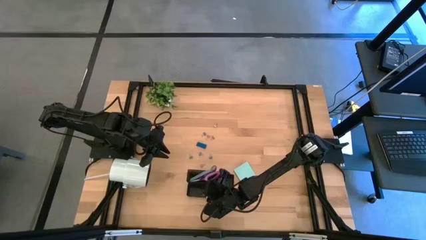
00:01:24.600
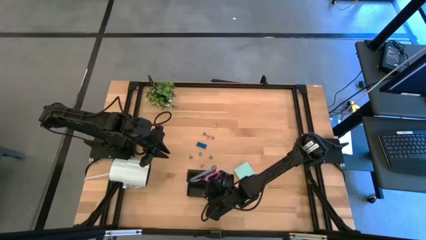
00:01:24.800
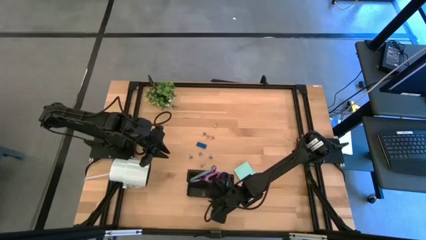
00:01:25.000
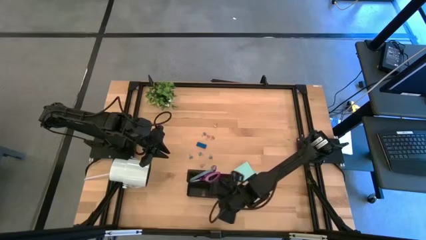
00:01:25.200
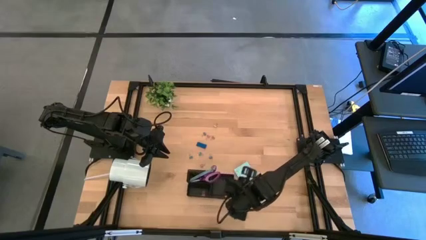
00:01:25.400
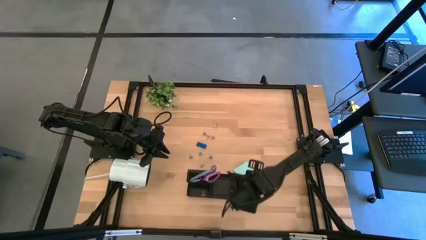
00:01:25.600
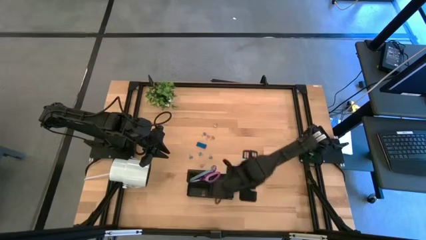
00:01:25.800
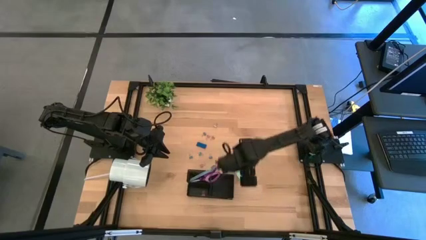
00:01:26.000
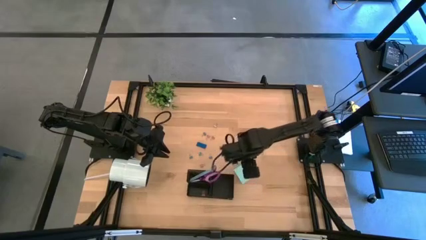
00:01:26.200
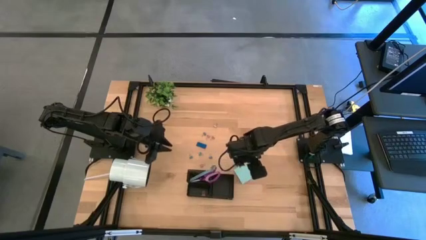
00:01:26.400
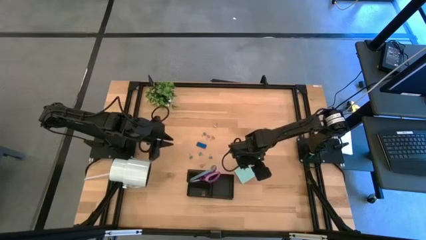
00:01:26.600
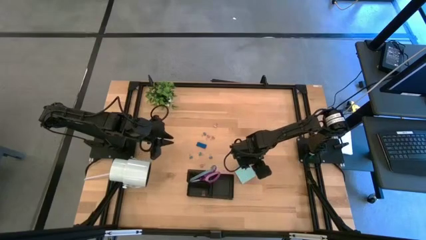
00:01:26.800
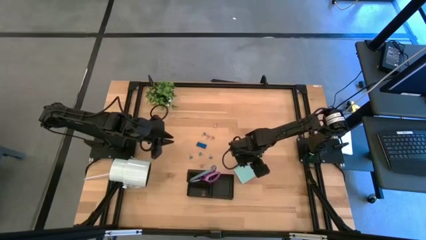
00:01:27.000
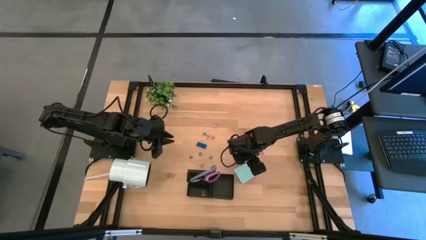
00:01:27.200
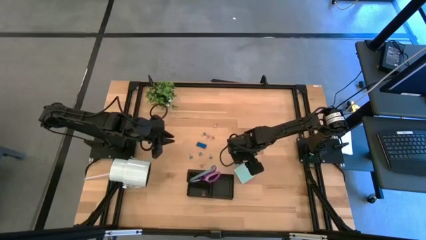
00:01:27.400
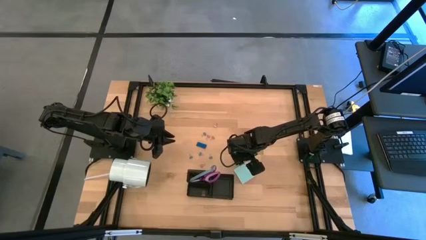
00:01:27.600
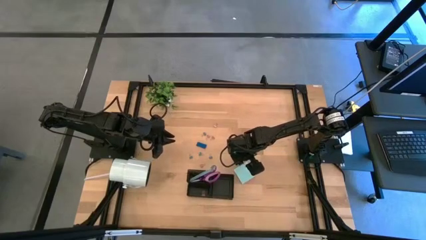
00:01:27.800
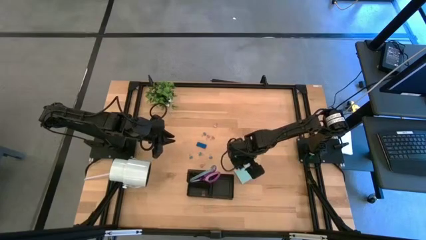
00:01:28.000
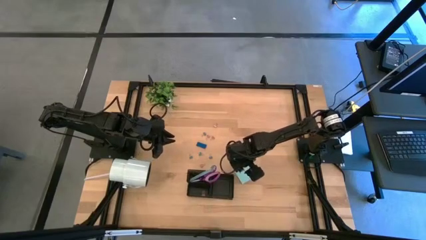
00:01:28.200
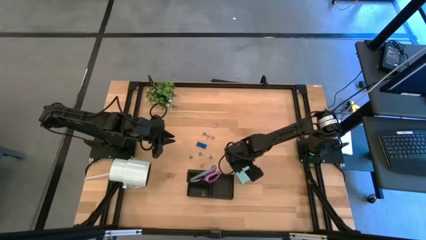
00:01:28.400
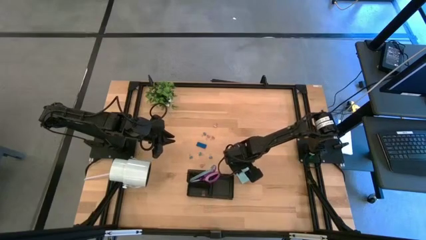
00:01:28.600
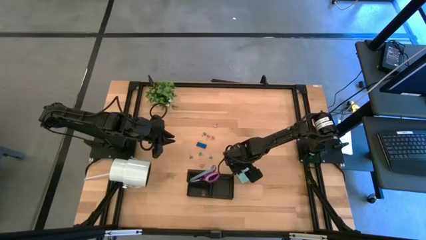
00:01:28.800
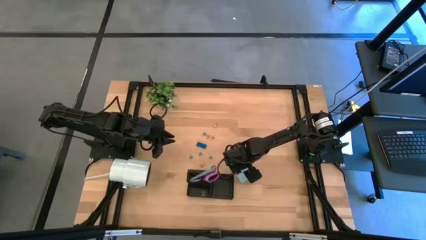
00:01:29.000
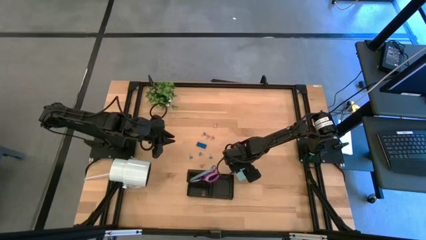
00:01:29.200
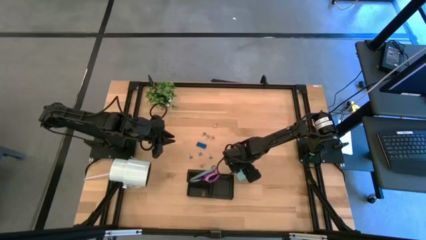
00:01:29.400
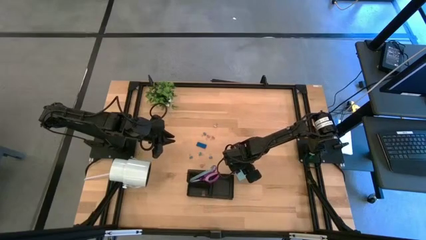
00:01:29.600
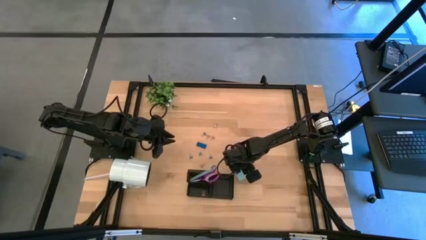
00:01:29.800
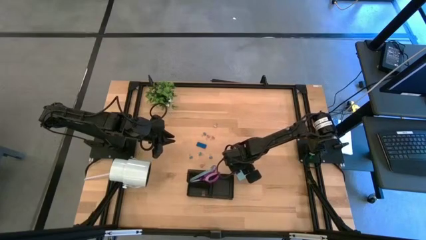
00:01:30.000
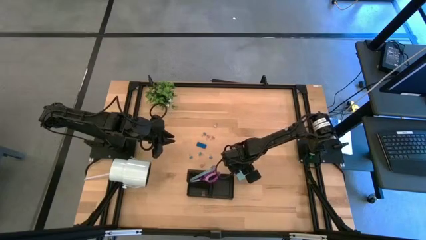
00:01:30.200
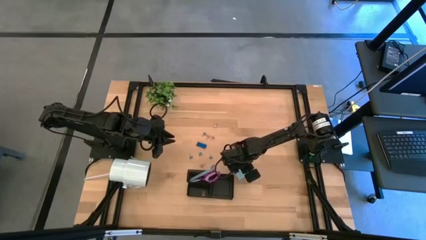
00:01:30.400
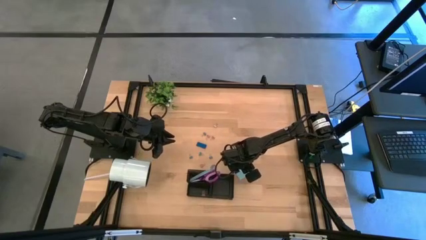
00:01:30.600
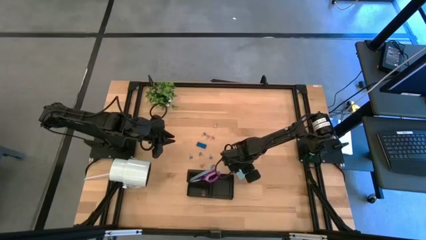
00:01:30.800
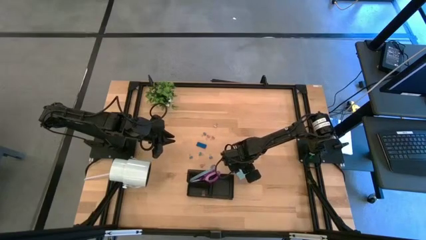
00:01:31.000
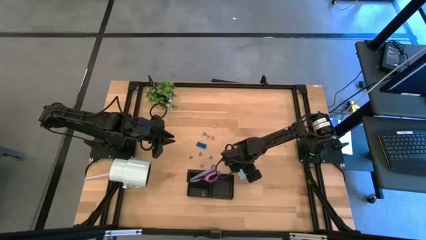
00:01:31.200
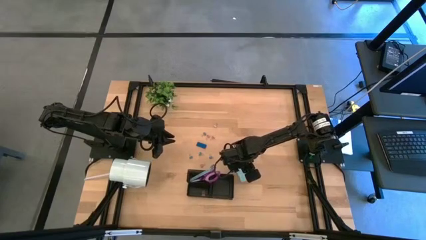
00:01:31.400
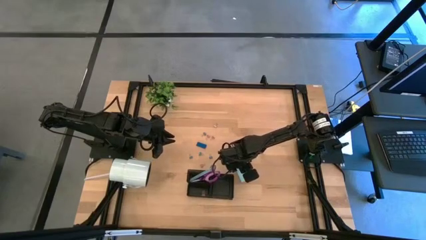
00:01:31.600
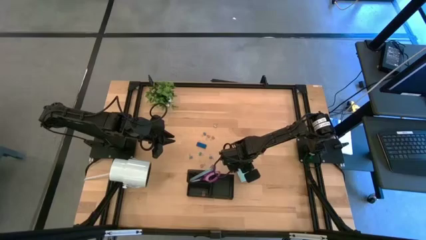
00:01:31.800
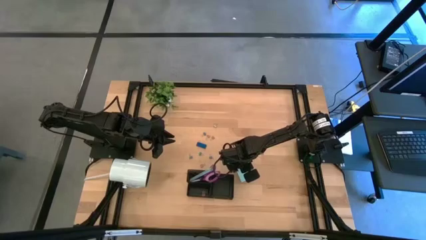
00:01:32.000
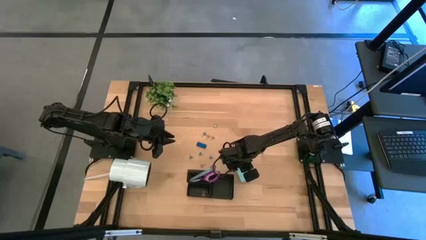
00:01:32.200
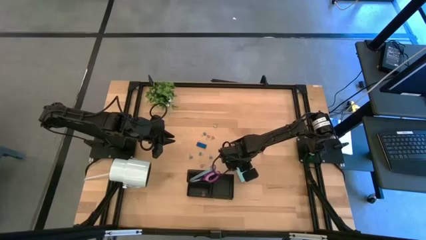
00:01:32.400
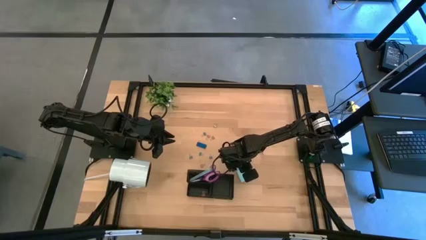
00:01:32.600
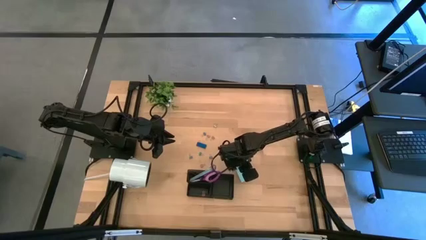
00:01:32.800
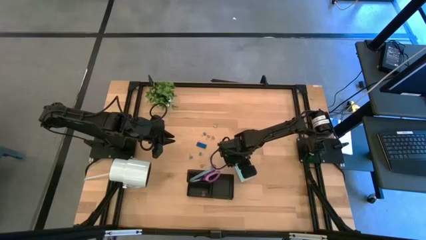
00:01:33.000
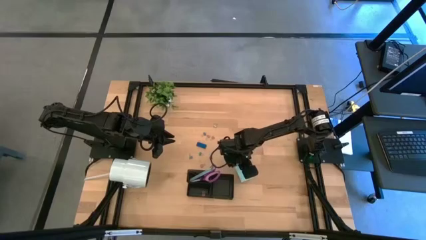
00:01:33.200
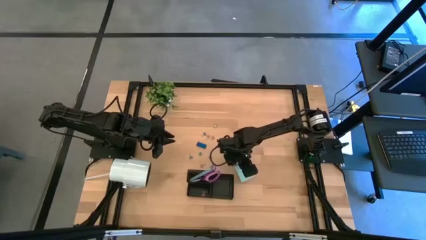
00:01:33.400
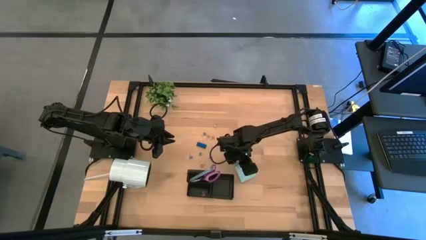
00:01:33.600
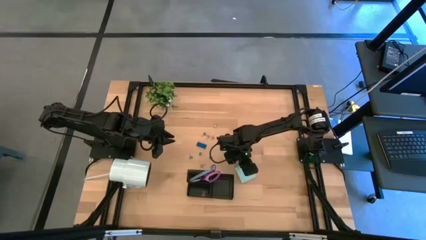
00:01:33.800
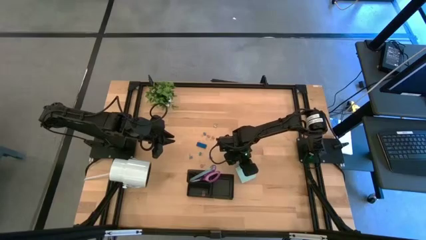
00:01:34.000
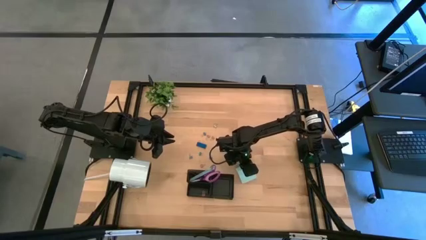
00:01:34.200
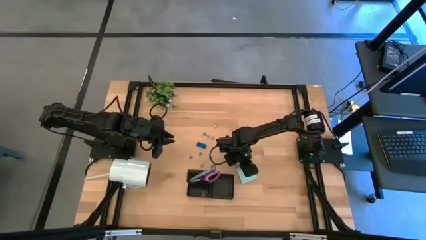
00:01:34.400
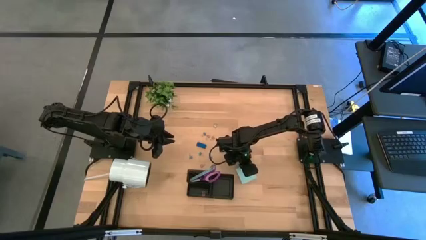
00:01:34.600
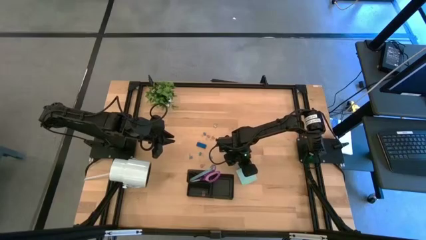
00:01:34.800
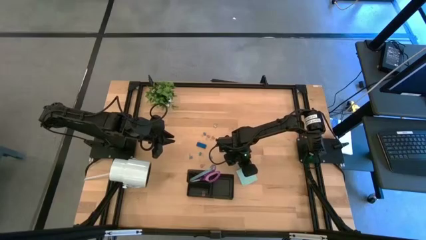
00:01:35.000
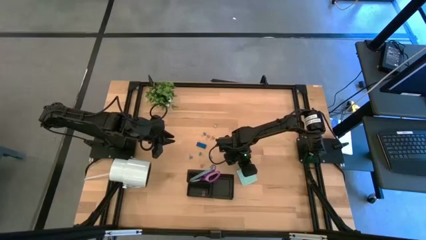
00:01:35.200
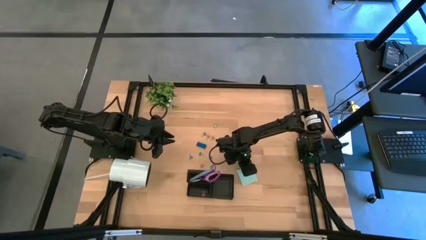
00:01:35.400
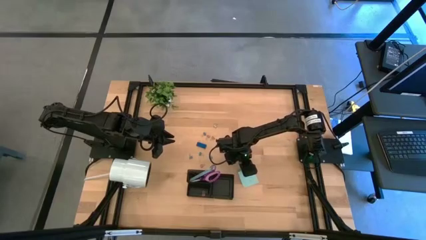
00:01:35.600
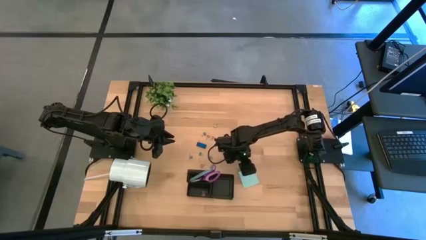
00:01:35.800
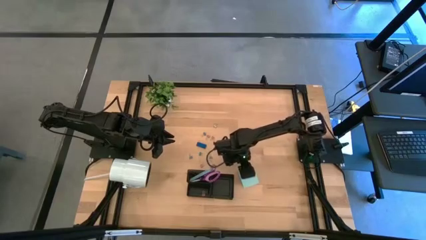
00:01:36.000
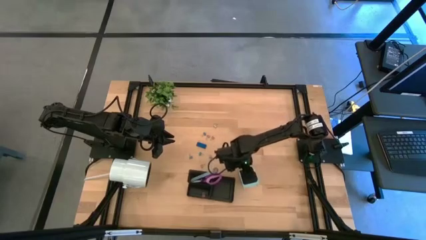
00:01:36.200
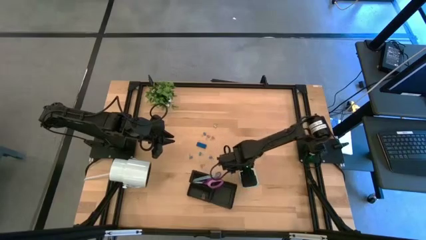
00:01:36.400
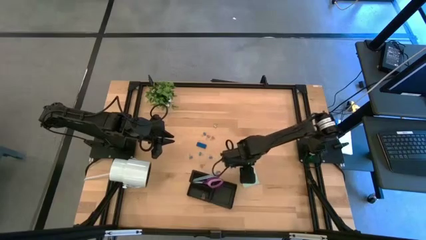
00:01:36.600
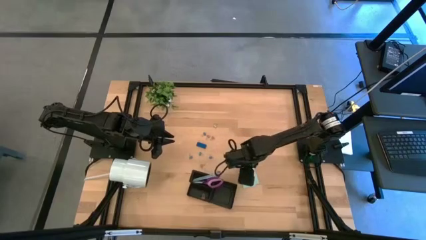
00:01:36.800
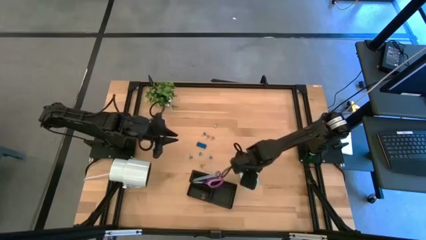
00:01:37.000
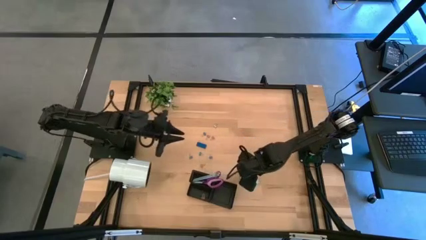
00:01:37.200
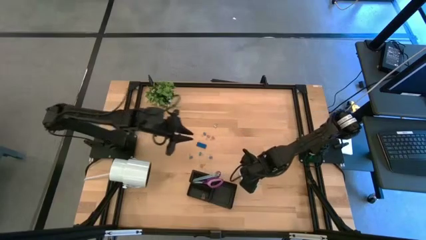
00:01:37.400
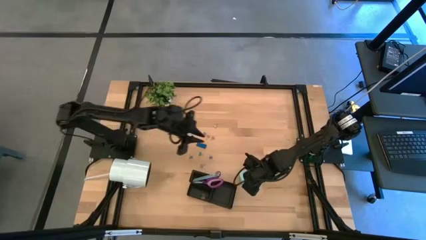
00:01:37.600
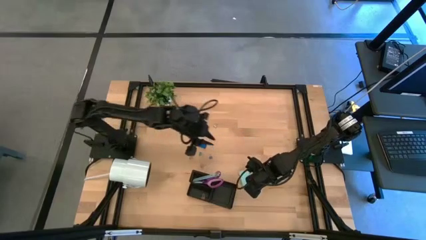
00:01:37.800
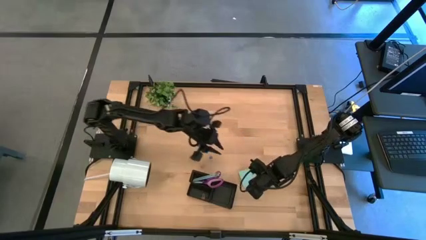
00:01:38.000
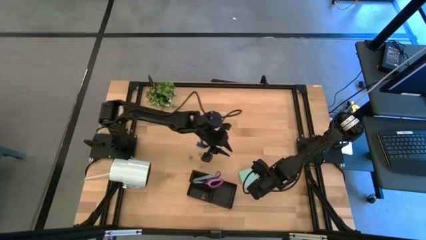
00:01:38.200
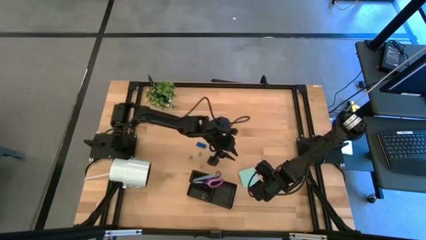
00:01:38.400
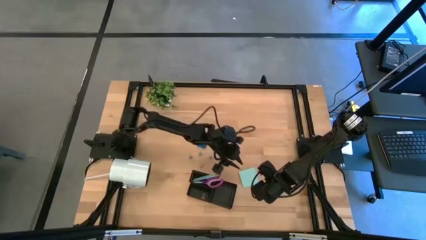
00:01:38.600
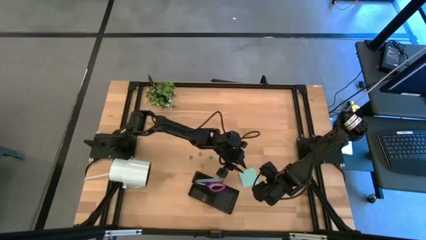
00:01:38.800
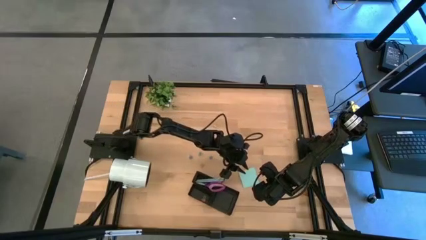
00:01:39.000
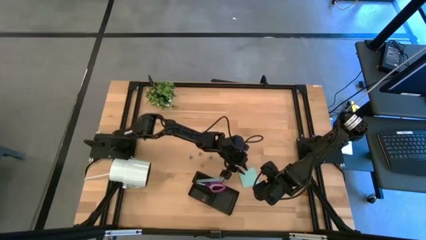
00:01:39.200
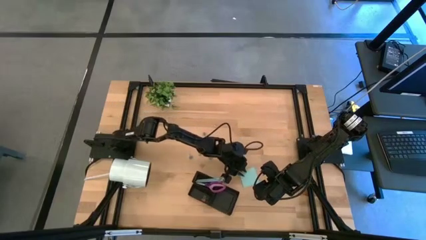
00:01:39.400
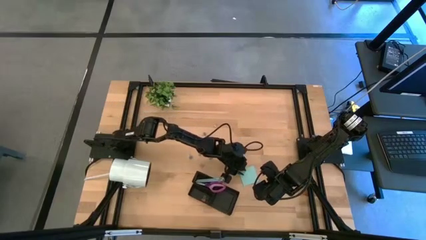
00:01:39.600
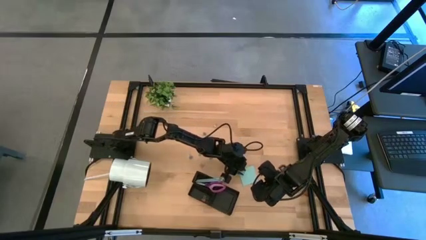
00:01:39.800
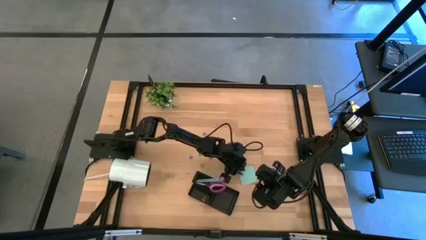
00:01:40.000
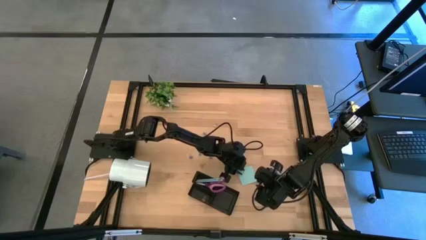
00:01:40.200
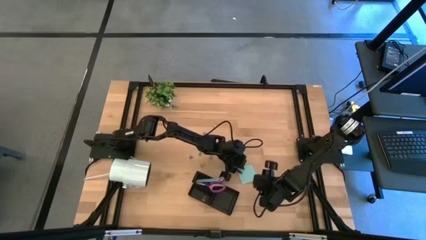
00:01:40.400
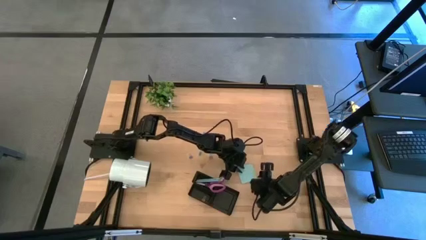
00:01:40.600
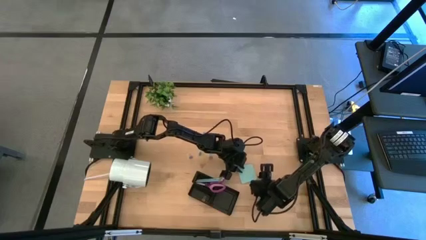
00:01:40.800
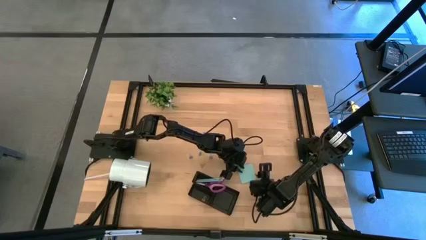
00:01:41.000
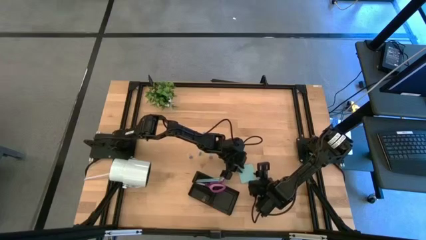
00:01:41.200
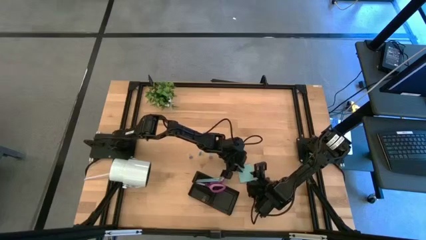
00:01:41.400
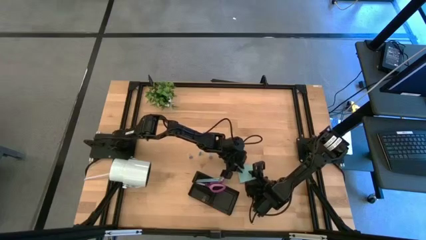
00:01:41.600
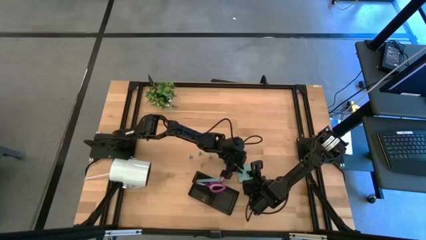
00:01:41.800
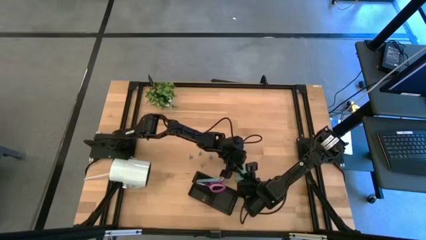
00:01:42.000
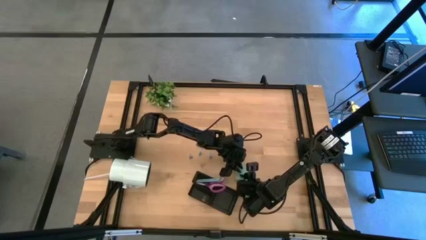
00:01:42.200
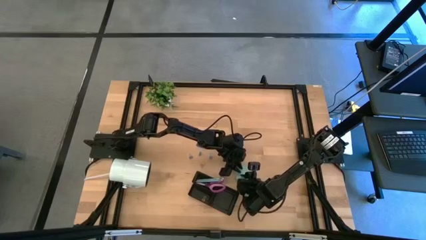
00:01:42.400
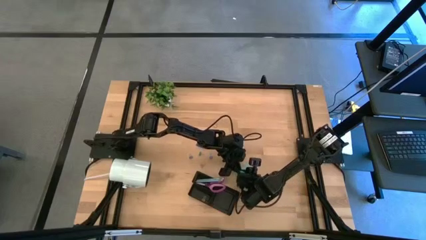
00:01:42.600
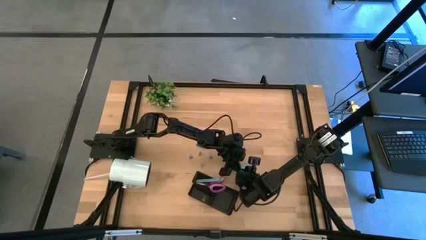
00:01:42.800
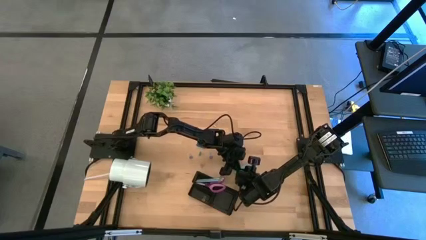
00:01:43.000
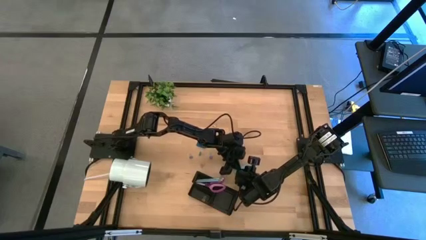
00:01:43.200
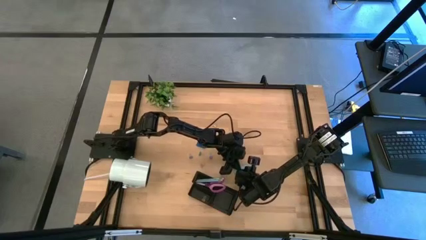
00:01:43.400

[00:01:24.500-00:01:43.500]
Task: Pick and place office supplies into organizer
Put the light blue sticky note into the desk organizer
